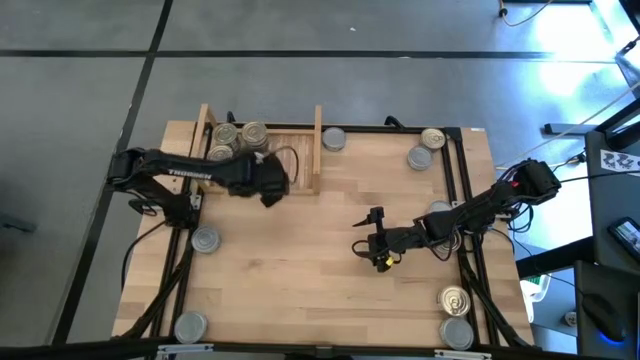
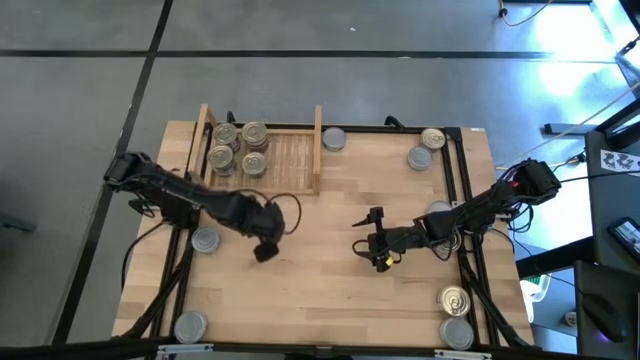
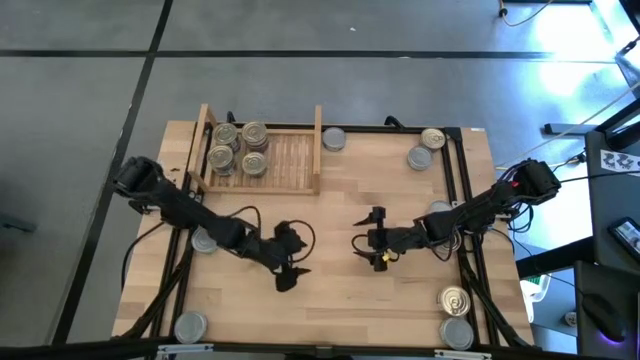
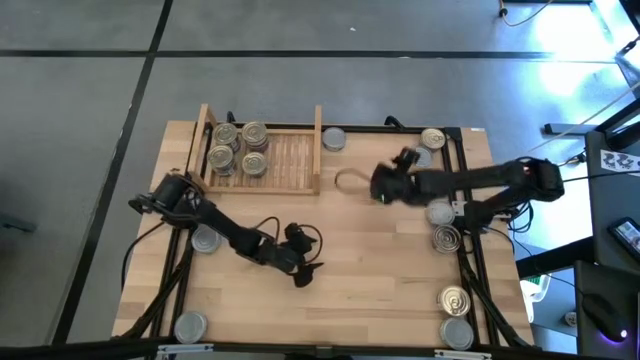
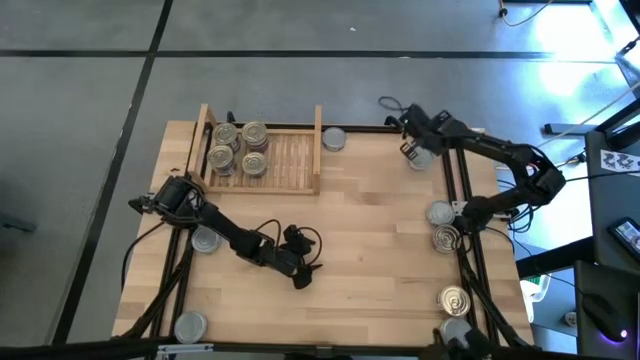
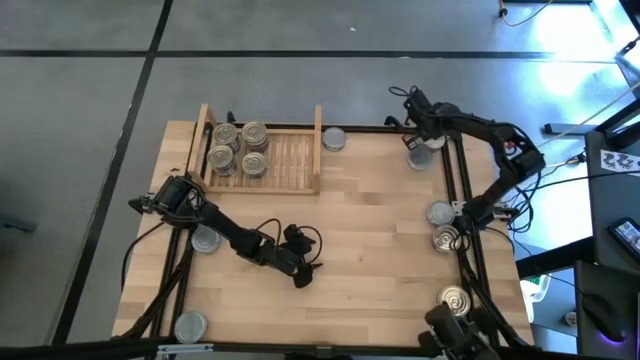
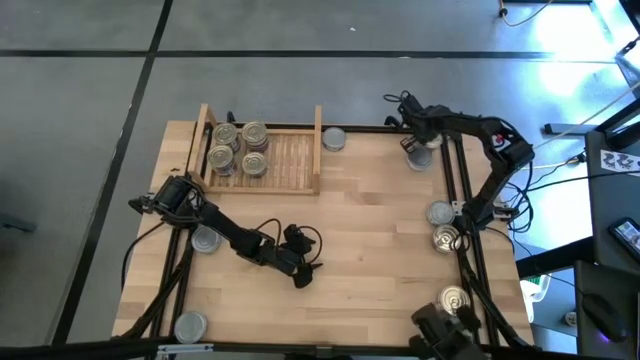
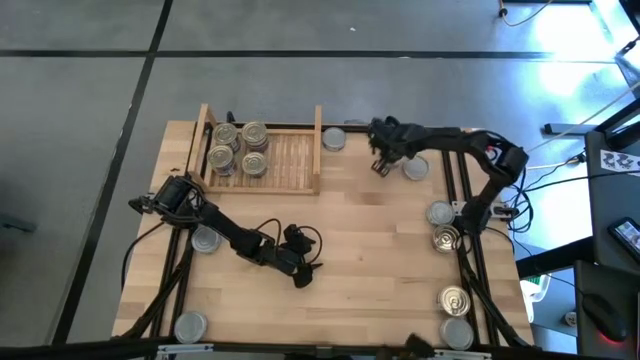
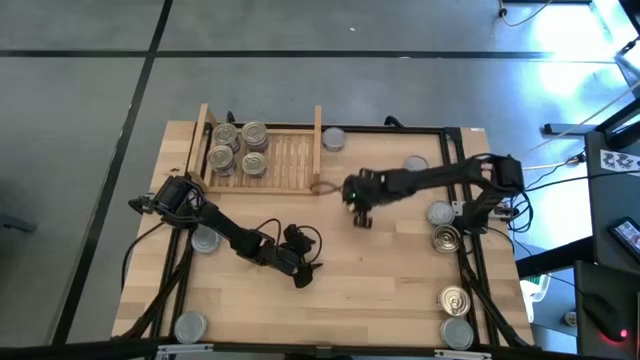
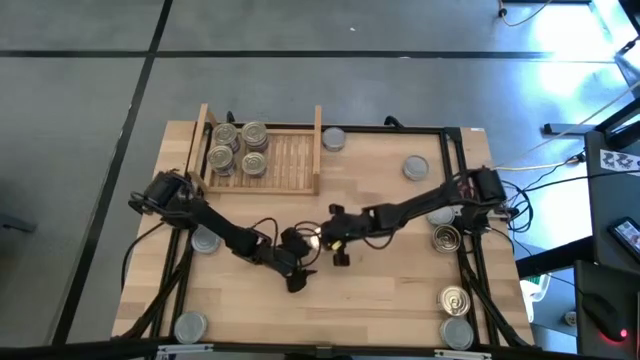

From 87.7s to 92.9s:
Task: Stack canned seafood by type on shelf
Move the blue tuna can from the top right to the center

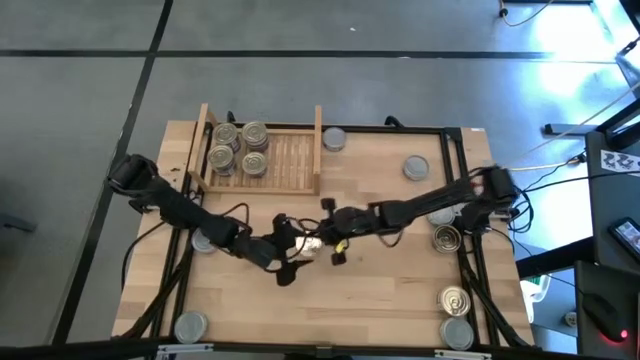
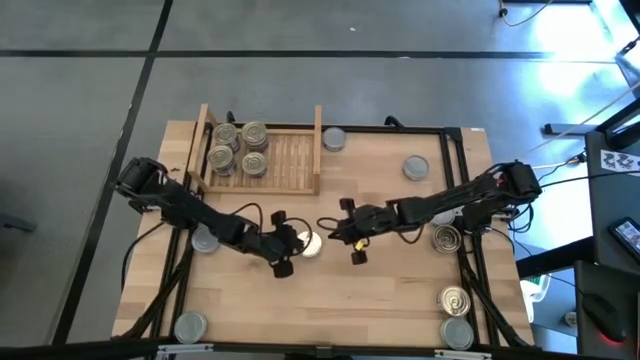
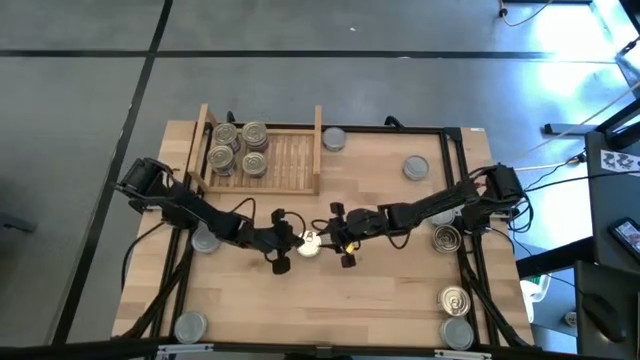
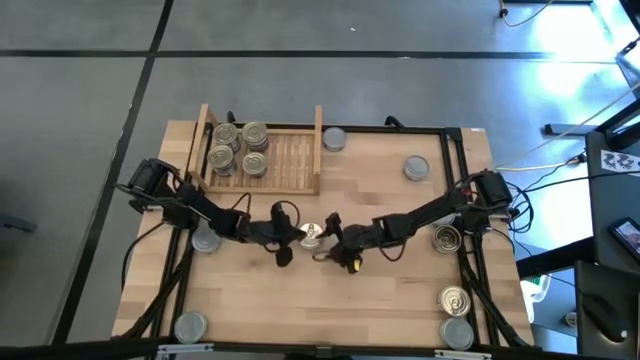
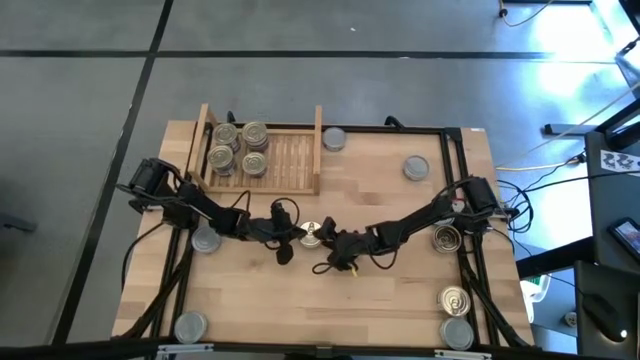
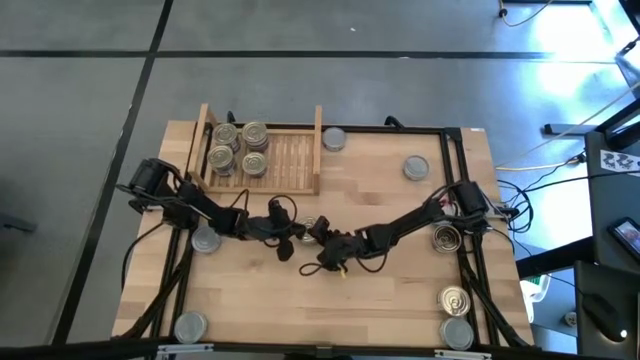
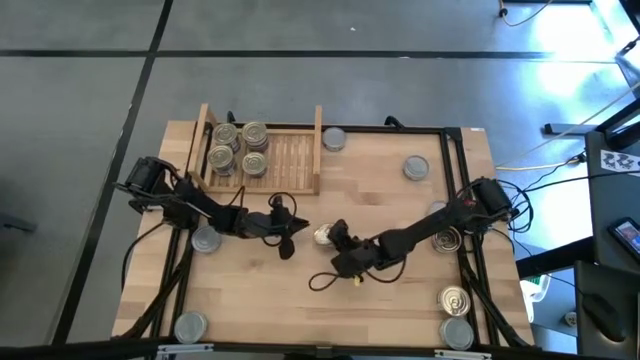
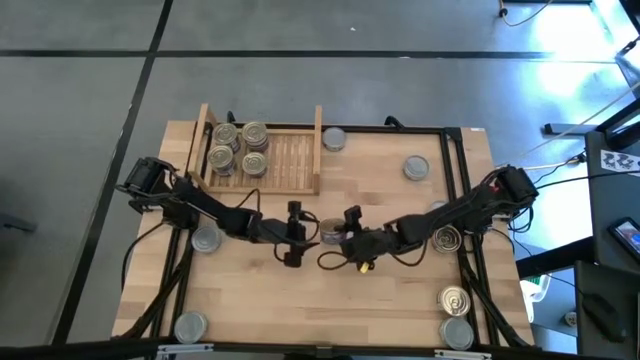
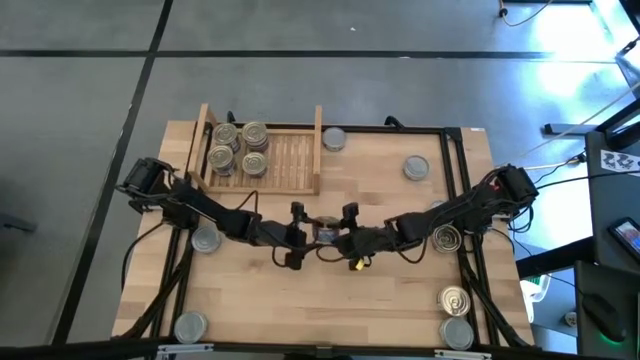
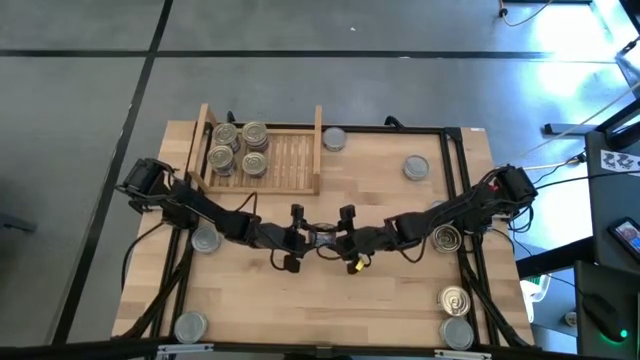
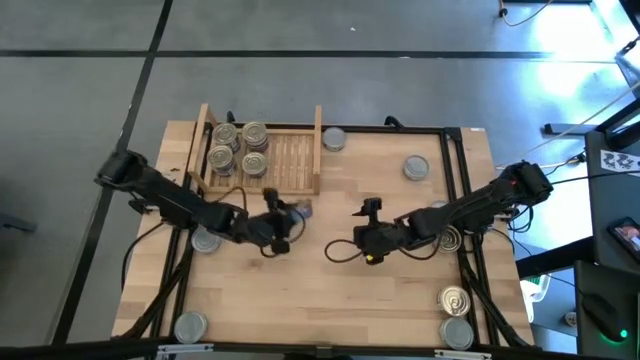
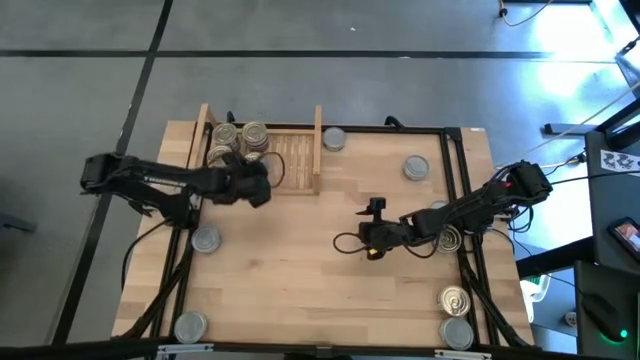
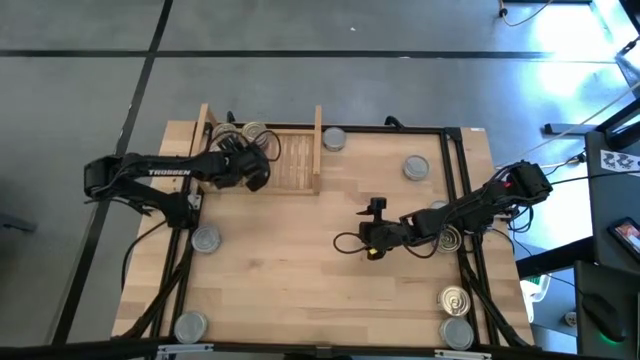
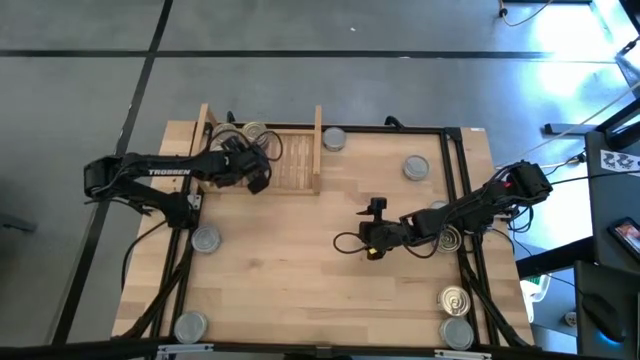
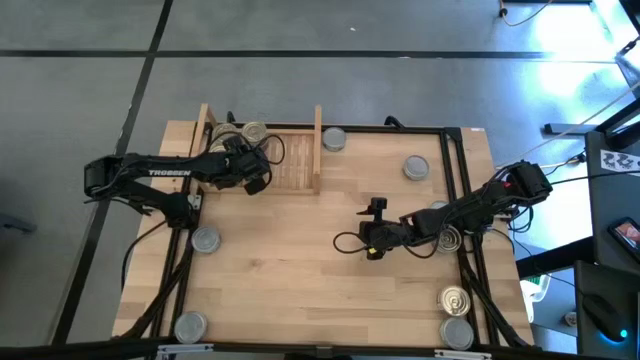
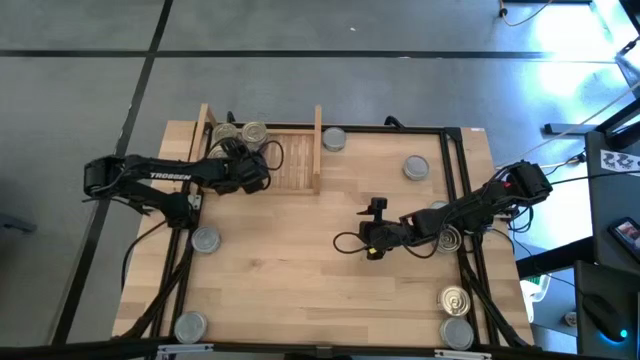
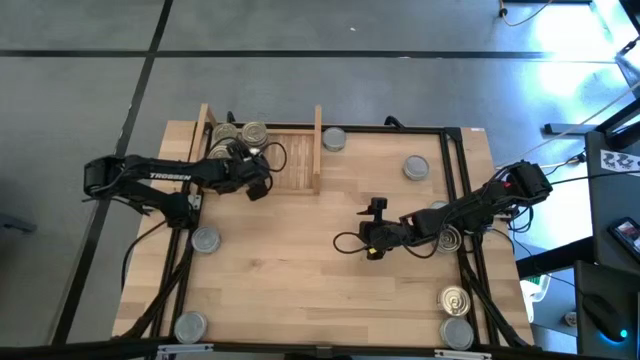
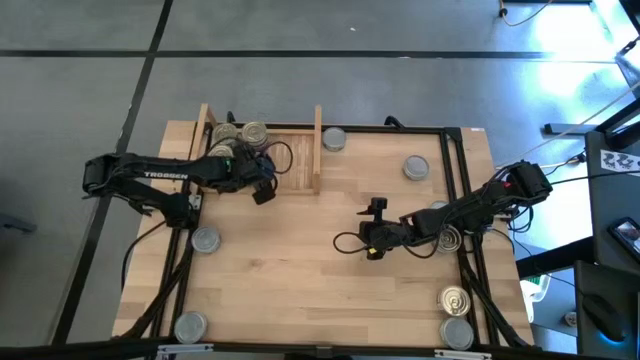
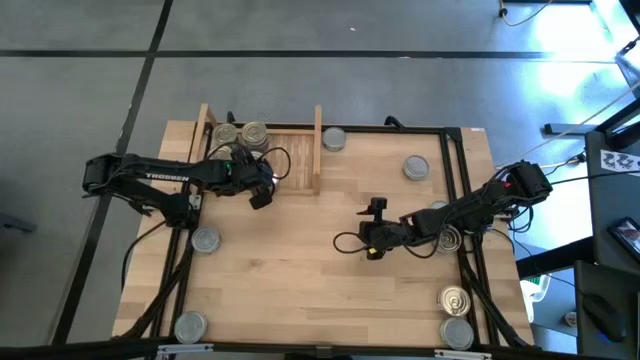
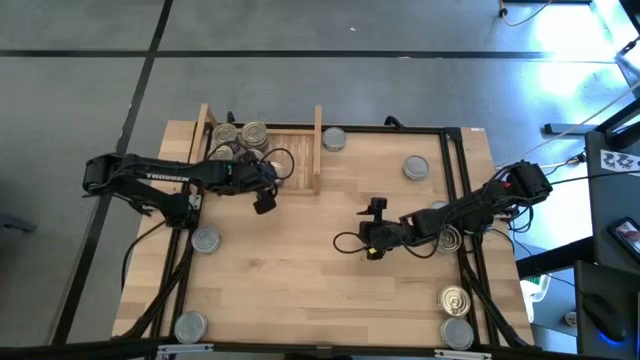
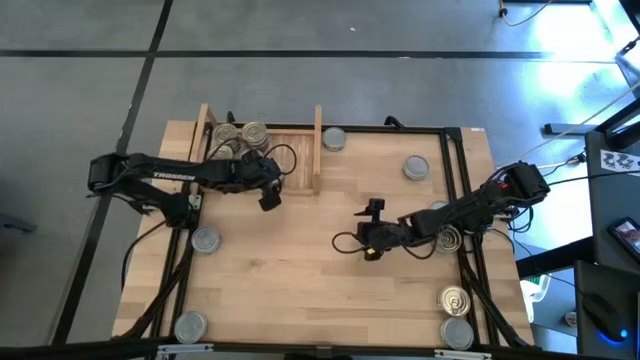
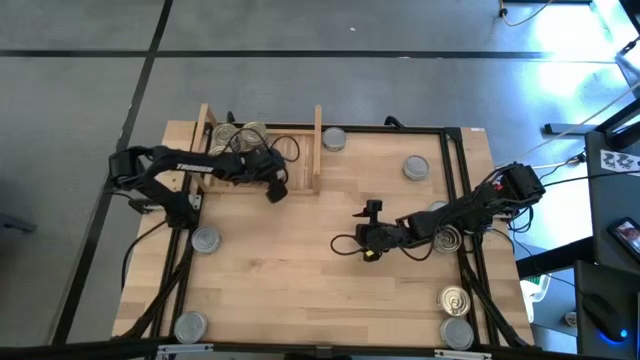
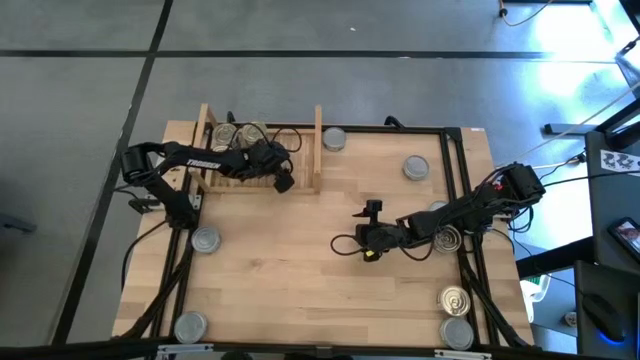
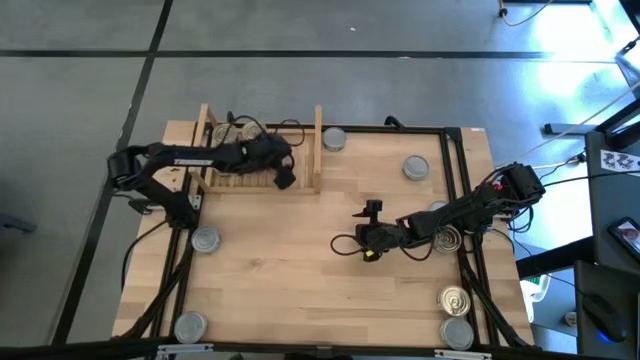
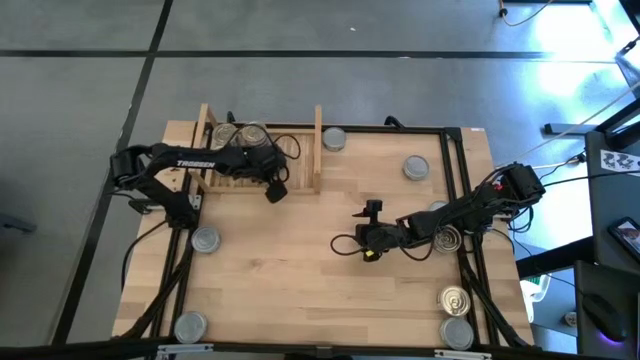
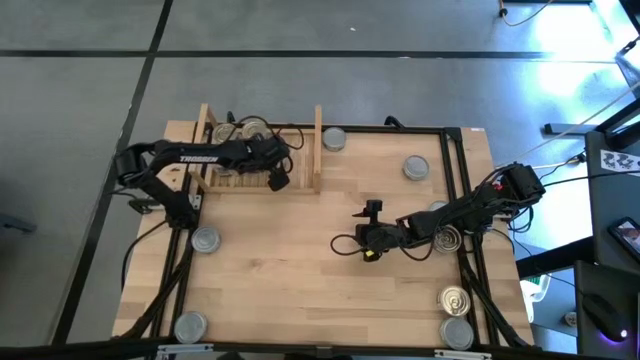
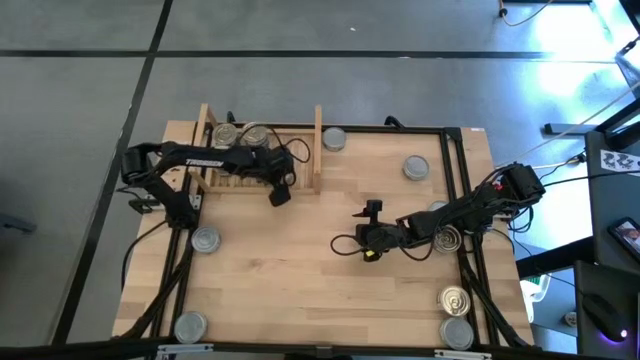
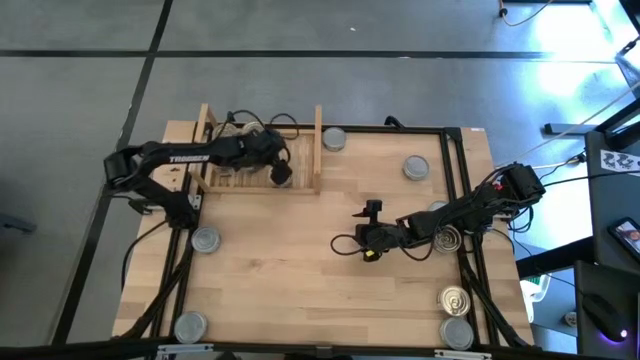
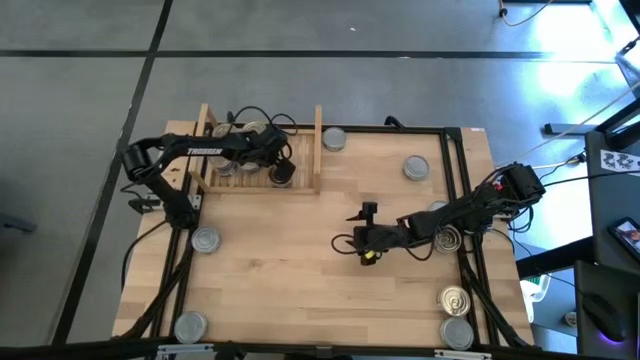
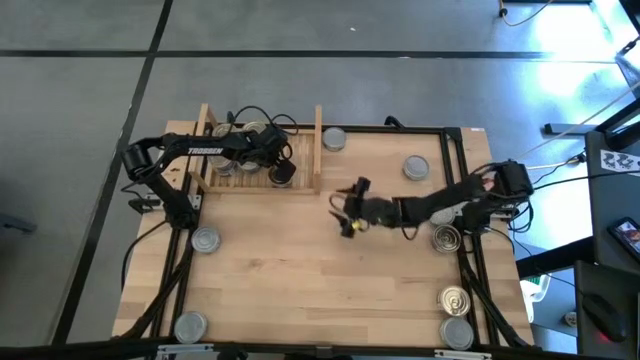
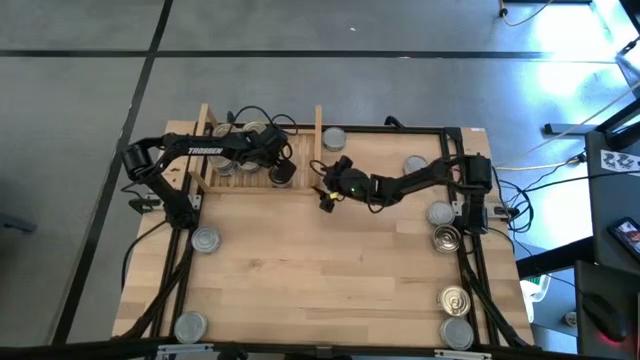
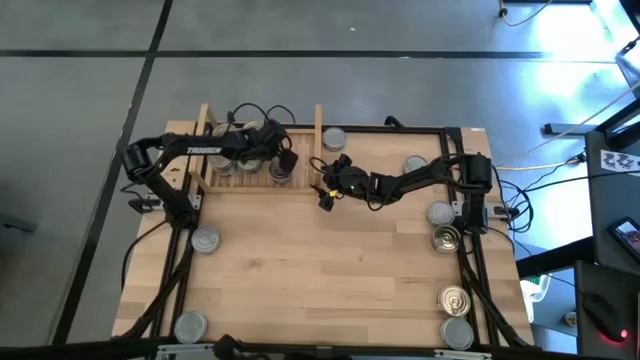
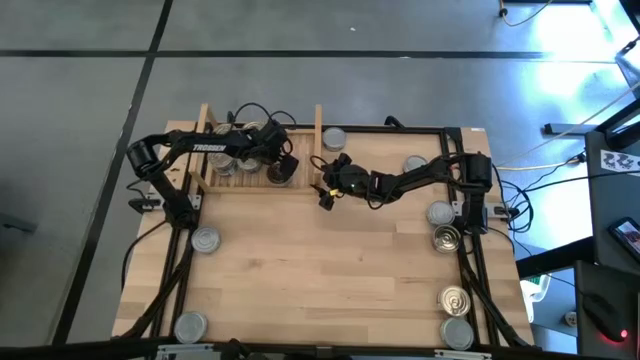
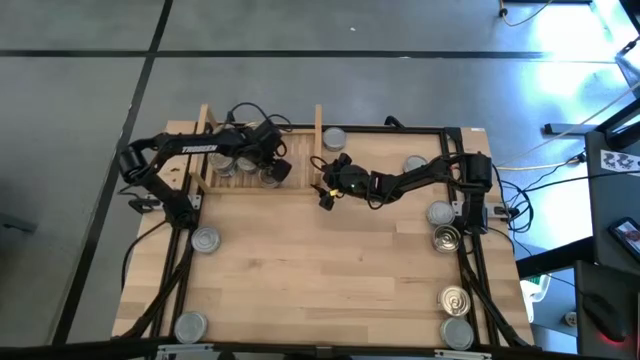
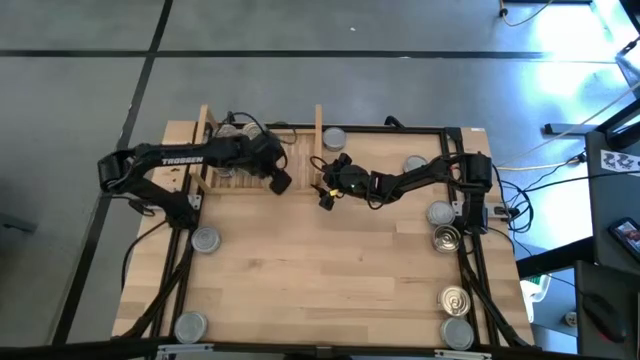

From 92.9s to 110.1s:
Stack the blue tuna can on top of the other blue tuna can on the shelf
